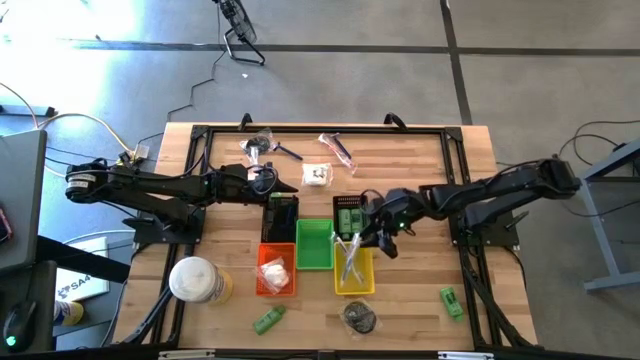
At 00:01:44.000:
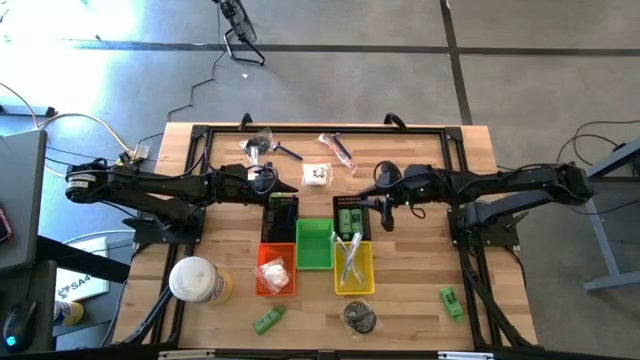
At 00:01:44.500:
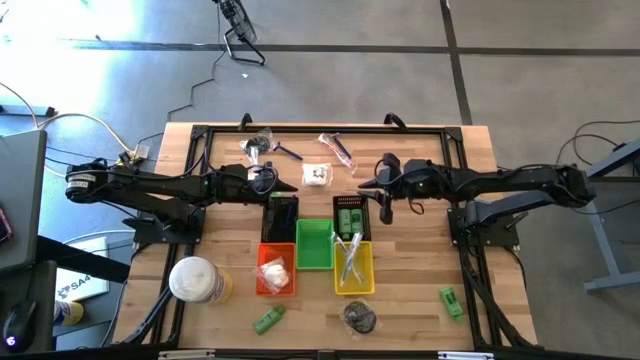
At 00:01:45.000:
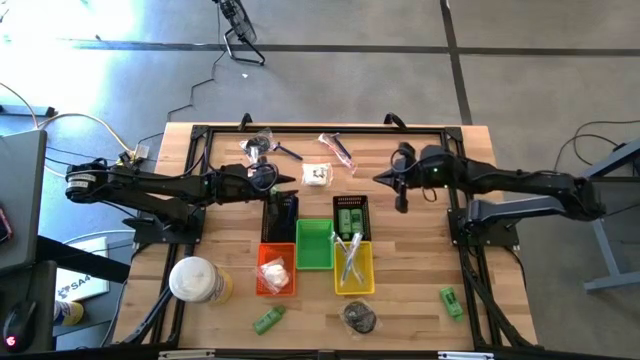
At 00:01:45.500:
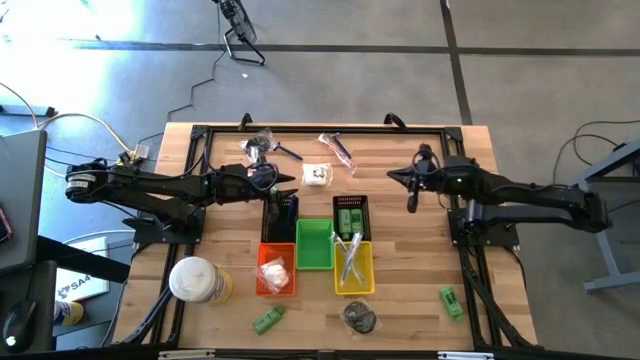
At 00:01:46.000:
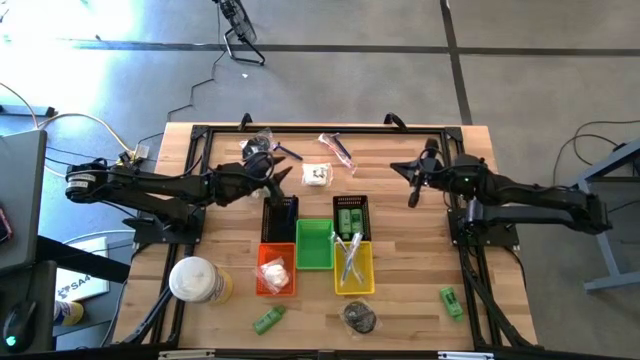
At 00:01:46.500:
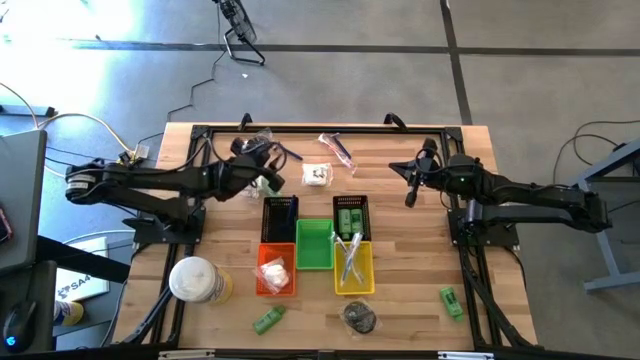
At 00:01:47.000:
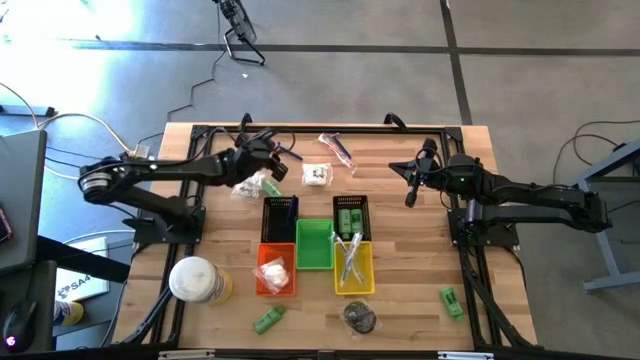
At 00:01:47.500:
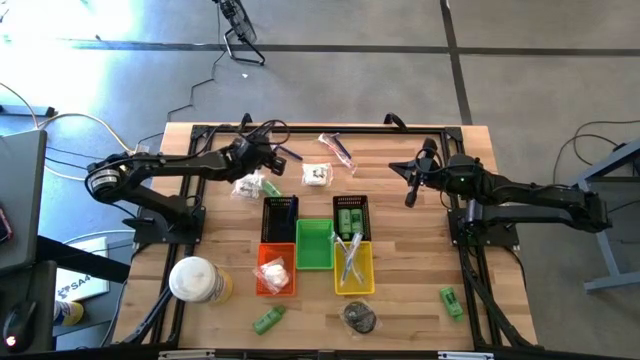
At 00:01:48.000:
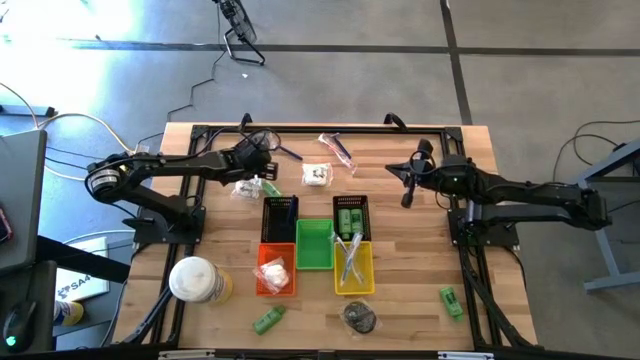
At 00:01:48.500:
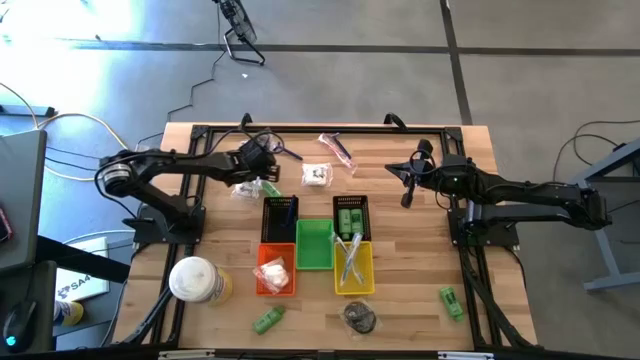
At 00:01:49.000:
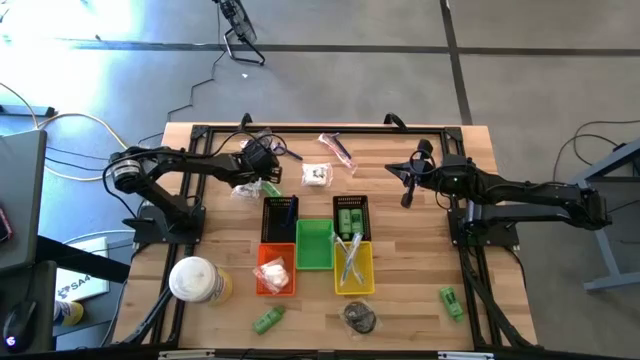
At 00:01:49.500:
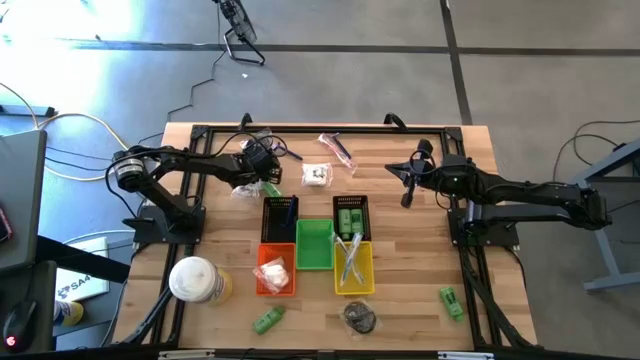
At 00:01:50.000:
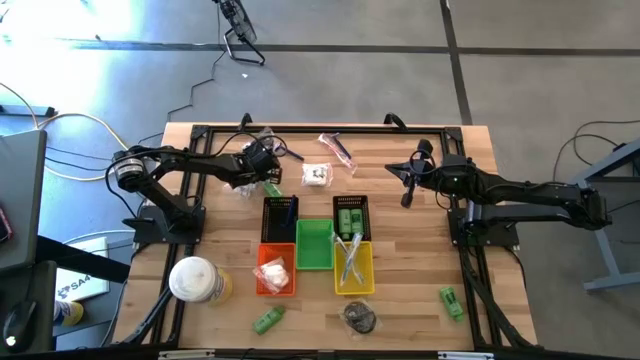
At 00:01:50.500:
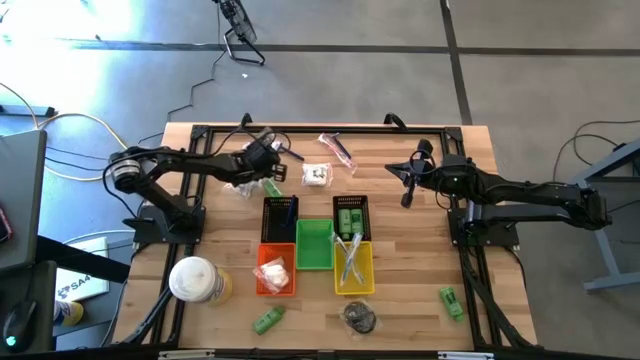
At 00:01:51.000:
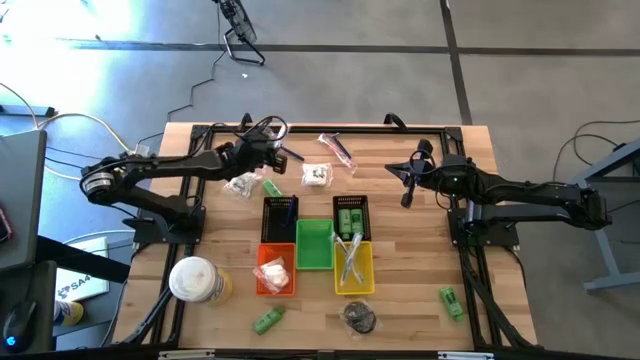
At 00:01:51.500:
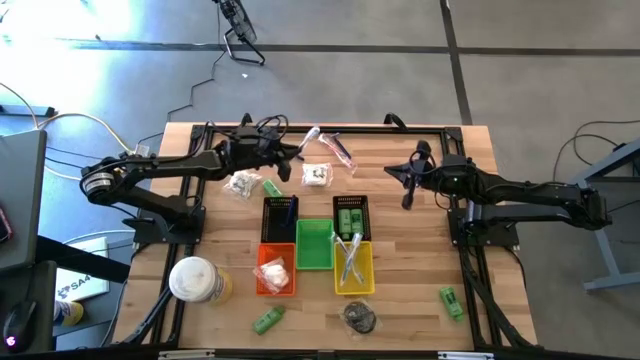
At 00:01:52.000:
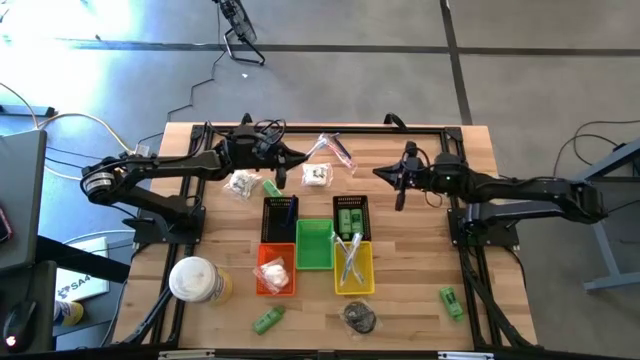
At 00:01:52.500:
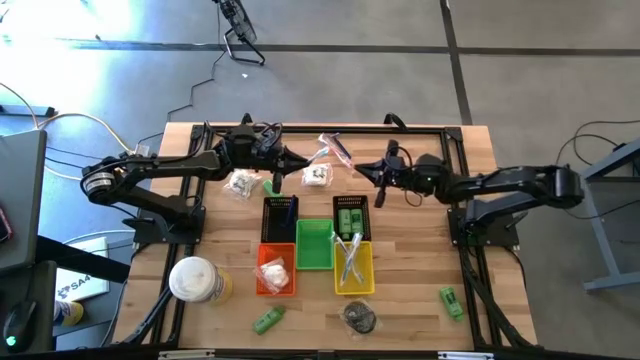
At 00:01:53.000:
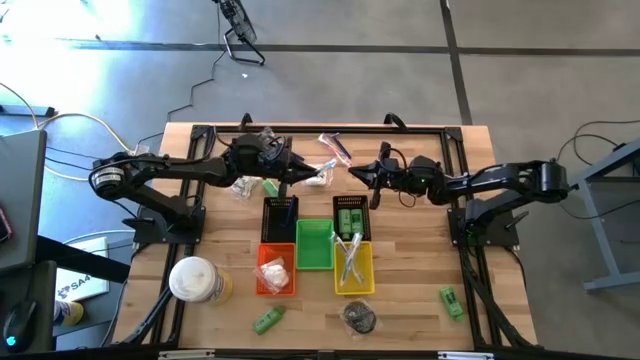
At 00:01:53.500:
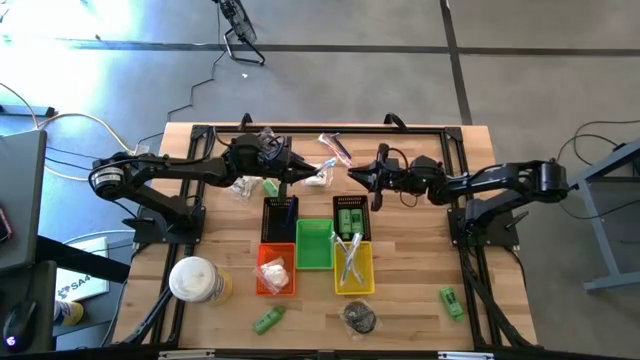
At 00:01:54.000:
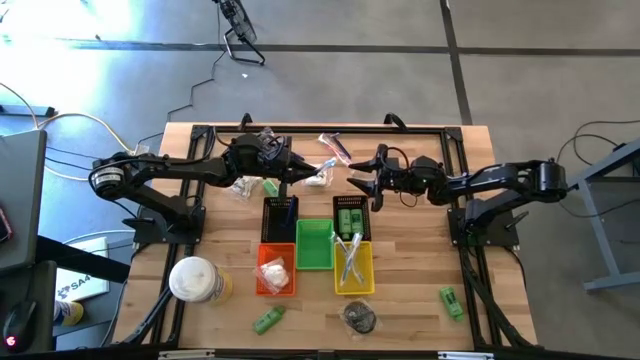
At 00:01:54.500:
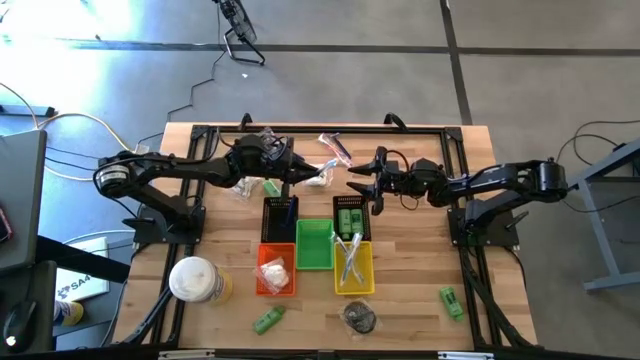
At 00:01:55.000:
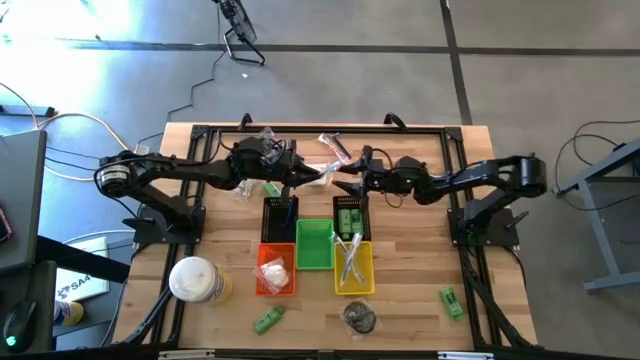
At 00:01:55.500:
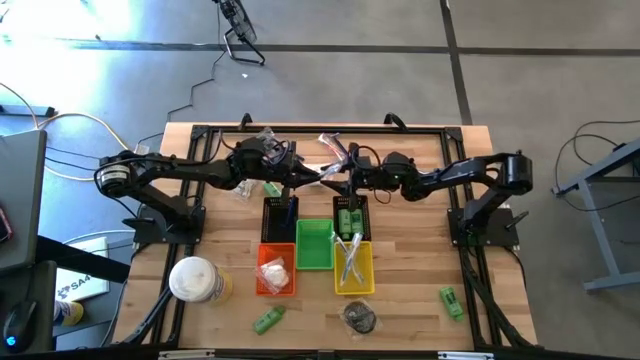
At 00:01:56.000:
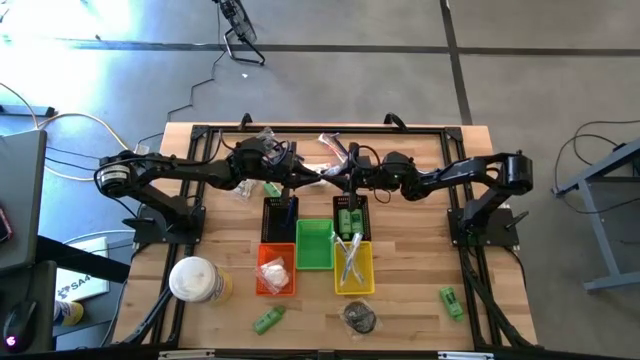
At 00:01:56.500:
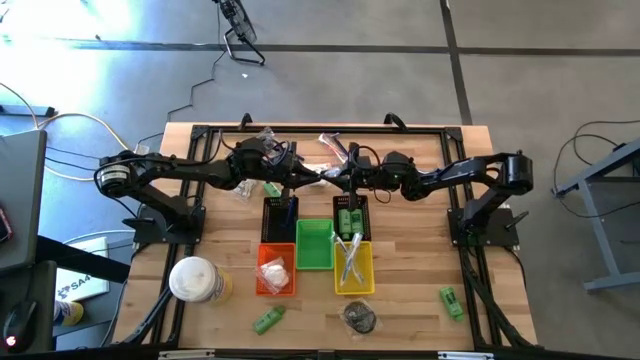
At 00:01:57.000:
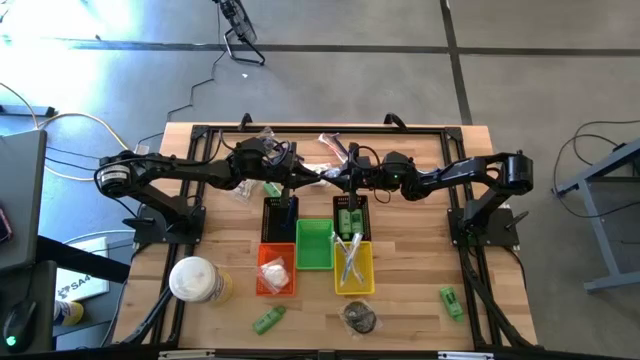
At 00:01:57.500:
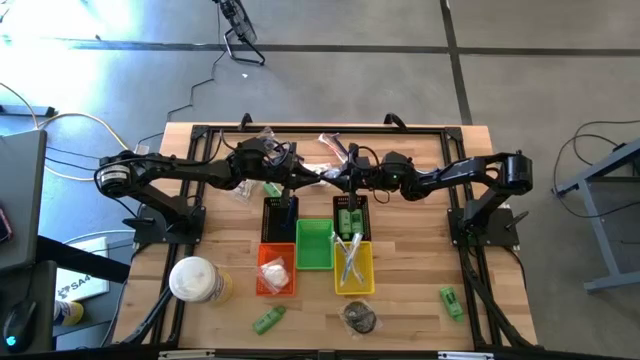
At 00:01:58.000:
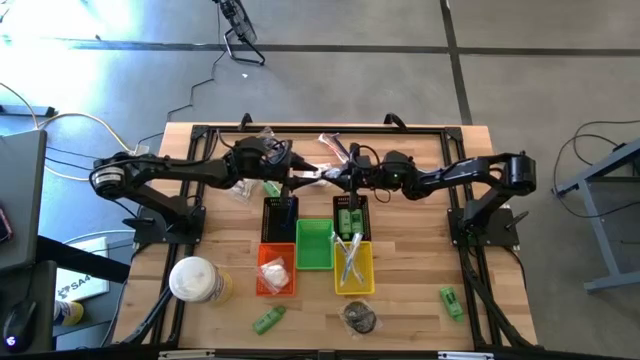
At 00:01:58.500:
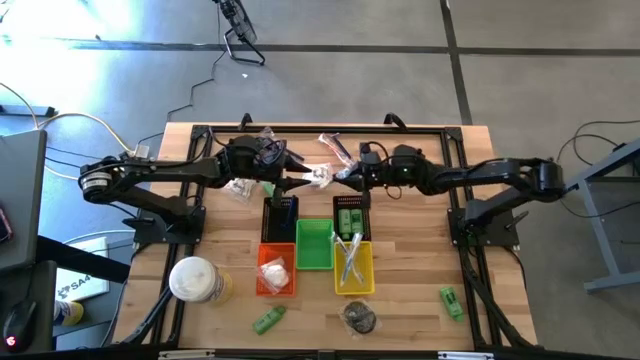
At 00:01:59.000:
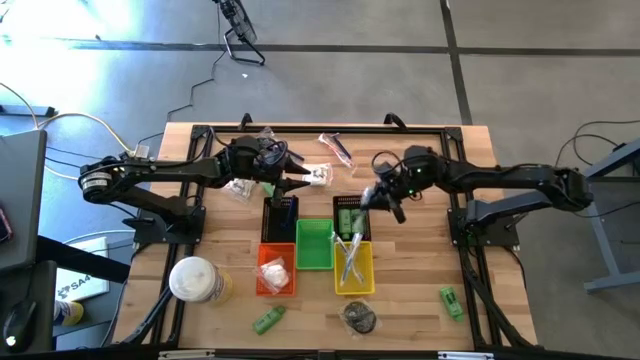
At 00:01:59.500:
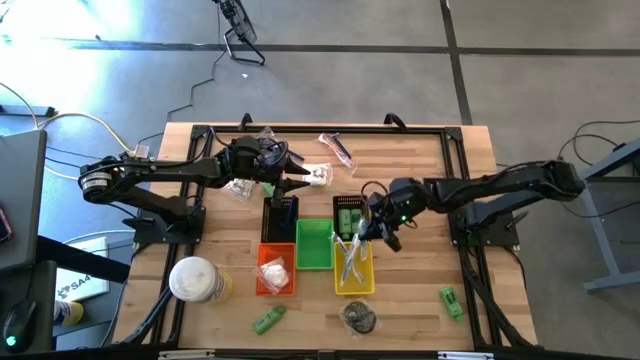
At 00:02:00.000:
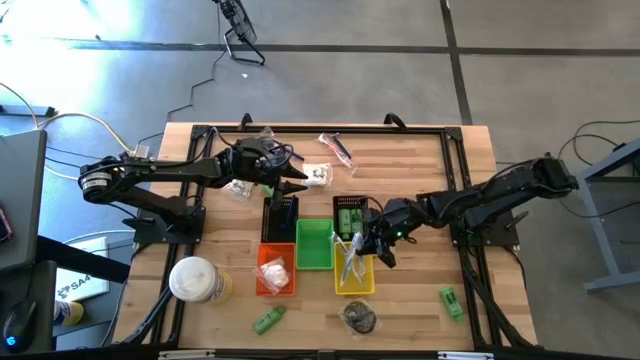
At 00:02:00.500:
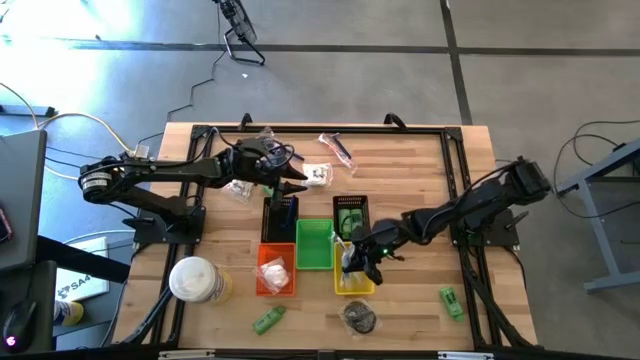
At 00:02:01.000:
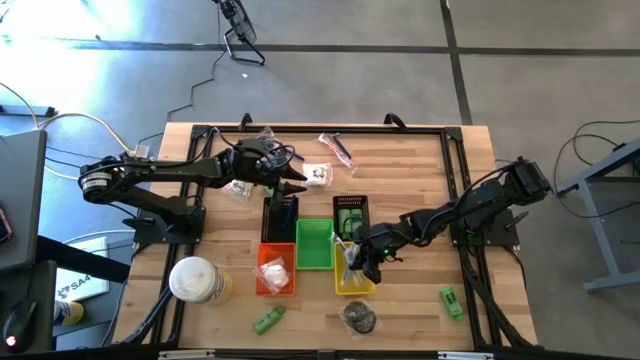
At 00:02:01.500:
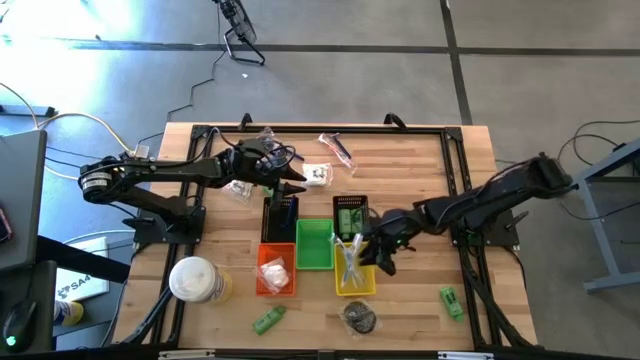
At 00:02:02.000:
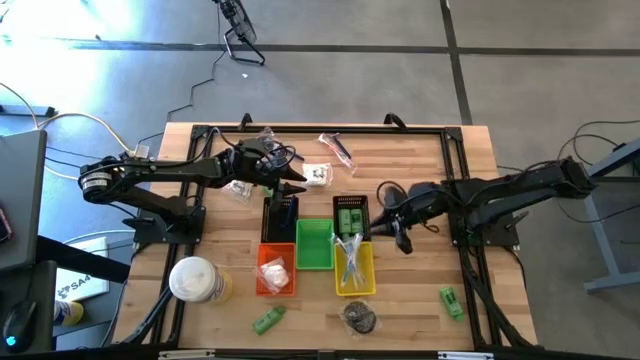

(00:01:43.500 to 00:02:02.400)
Task: Pick & Place Travel size toiletries
Put the blue toothbrush into the yellow bin

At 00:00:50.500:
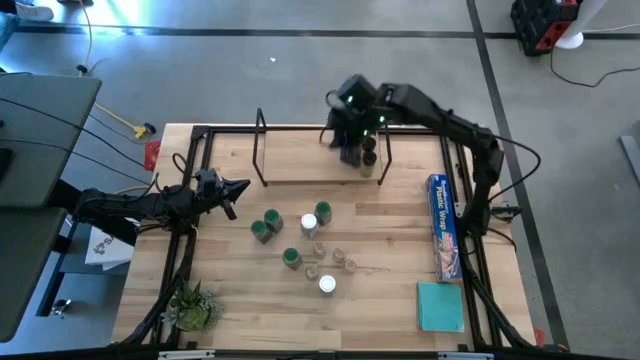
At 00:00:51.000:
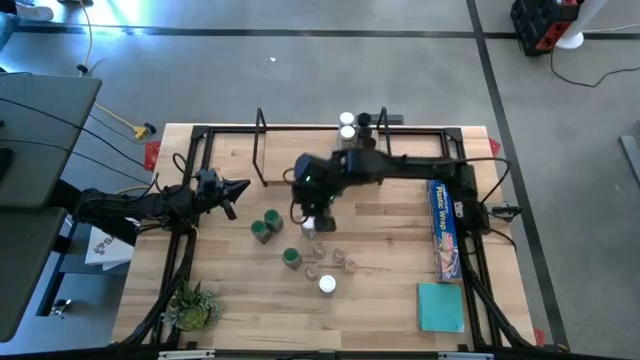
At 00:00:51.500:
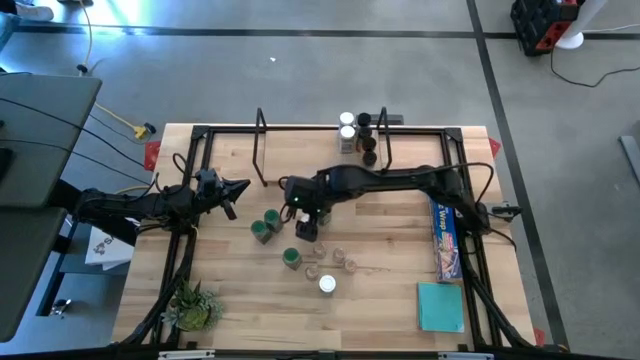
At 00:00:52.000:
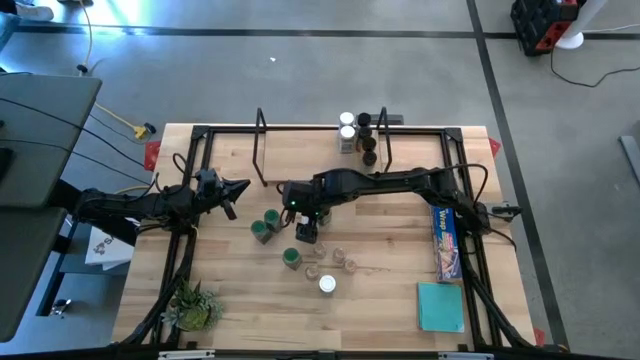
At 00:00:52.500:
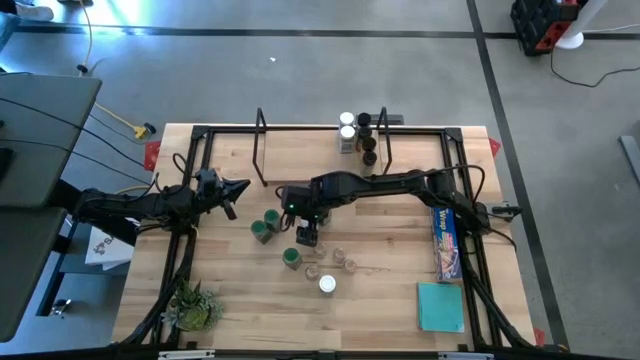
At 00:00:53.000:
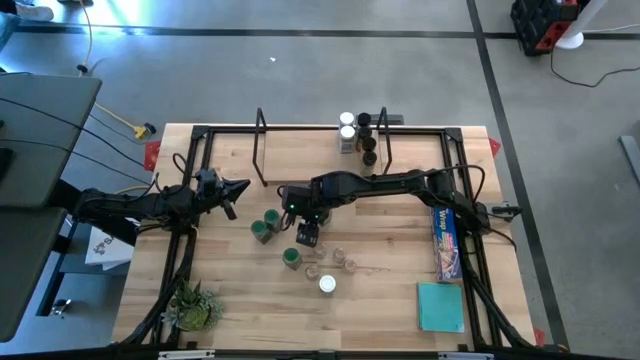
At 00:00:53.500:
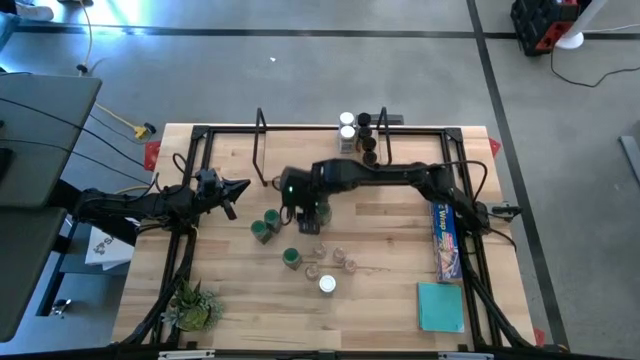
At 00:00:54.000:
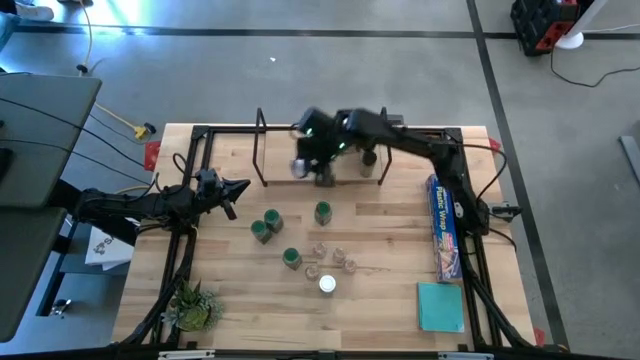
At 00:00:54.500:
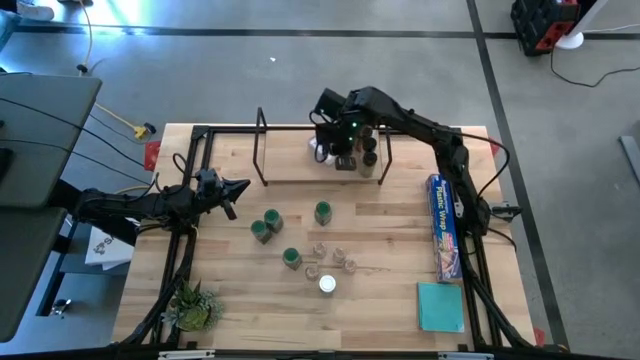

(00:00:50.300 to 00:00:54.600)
Task: Shelf spices
Put the top white seasoning bottle on the shelf and align with the other white seasoning bottles
